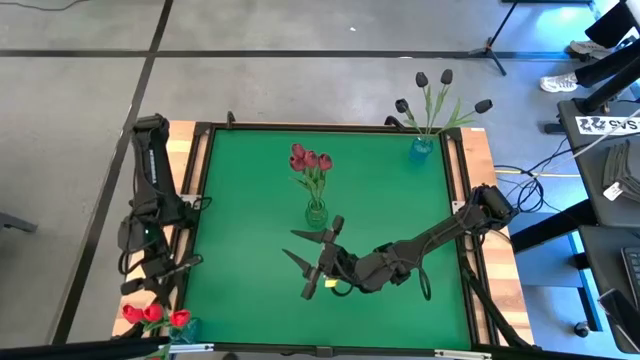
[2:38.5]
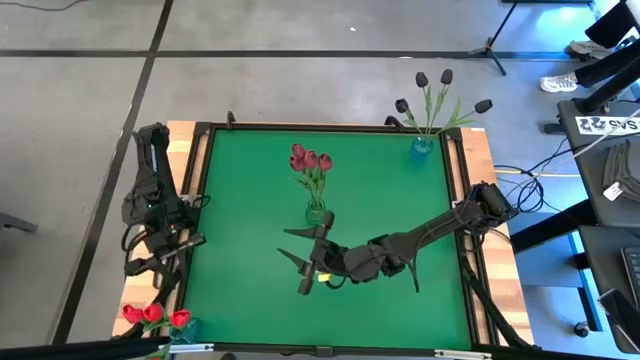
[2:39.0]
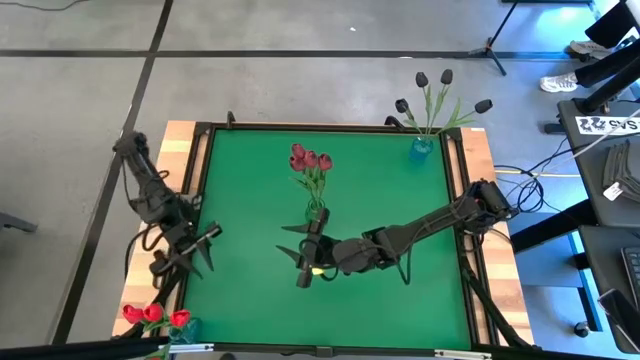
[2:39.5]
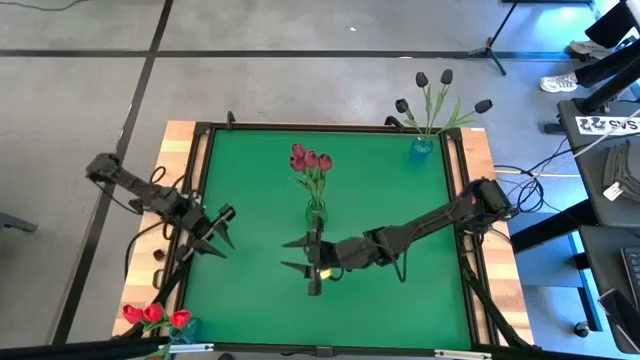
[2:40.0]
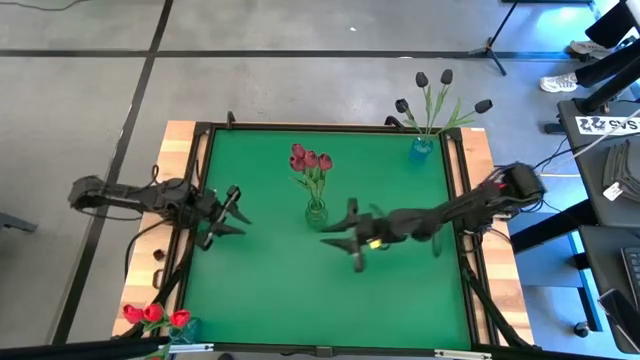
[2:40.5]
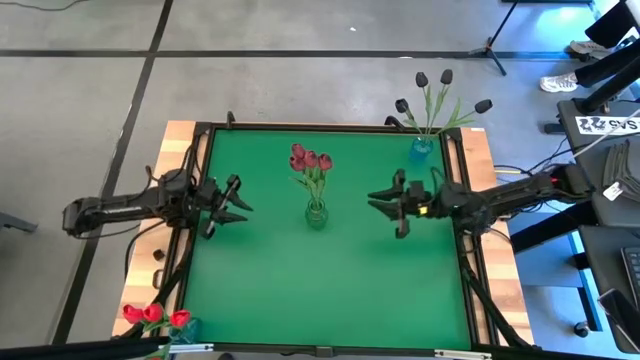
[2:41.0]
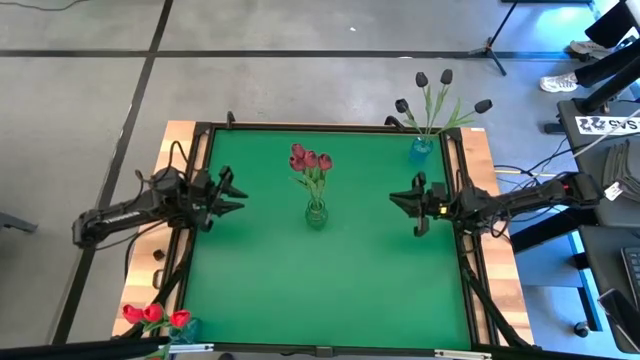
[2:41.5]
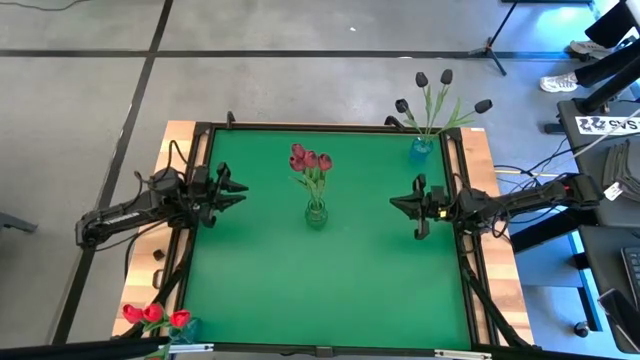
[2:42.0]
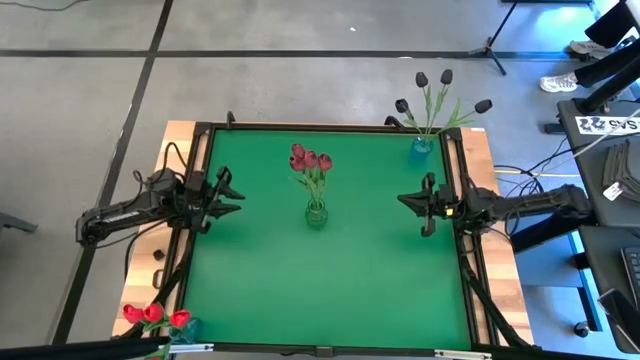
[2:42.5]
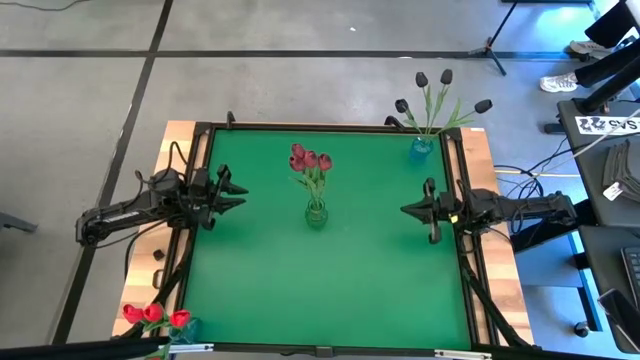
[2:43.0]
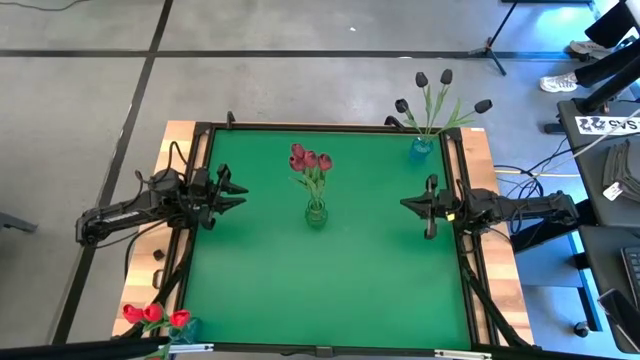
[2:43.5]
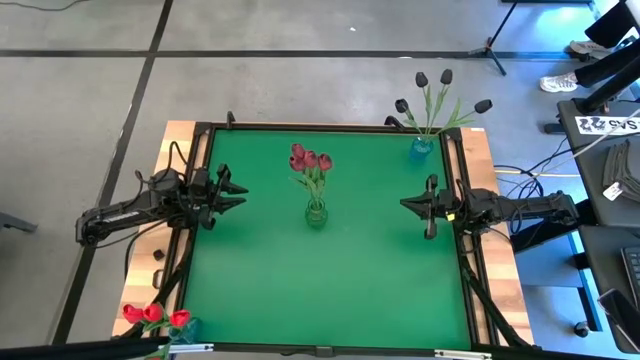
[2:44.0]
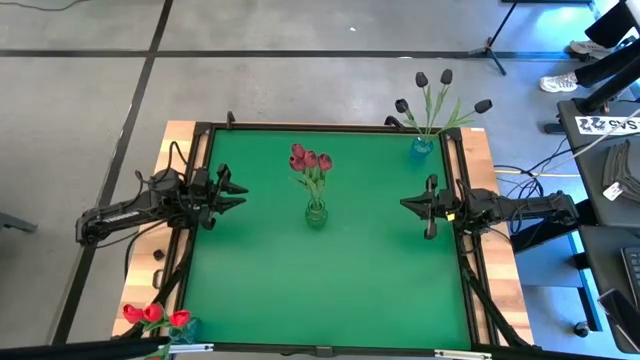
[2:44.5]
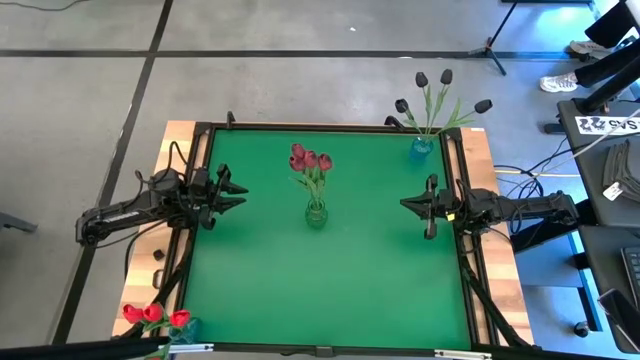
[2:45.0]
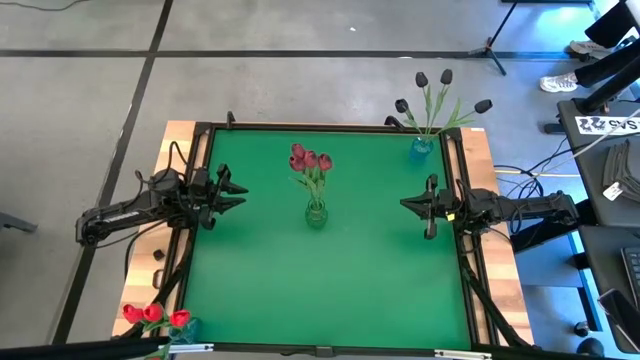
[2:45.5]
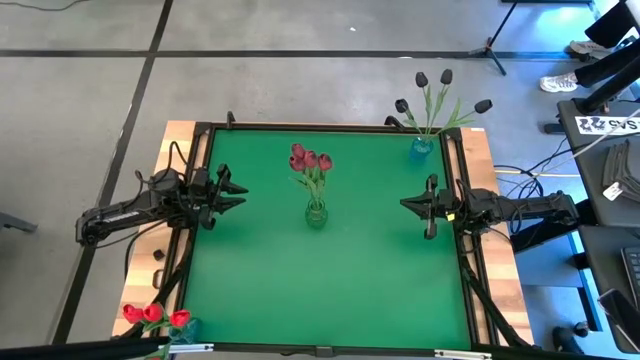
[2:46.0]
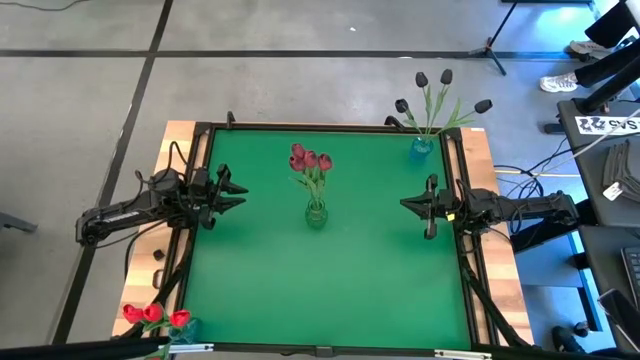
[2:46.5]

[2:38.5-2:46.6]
Task: Sort flowers into vase by color
Return to Home Position

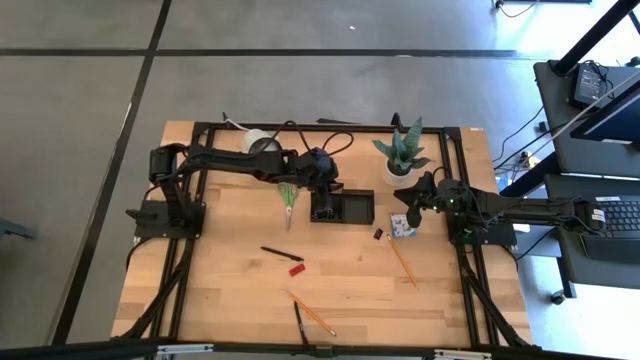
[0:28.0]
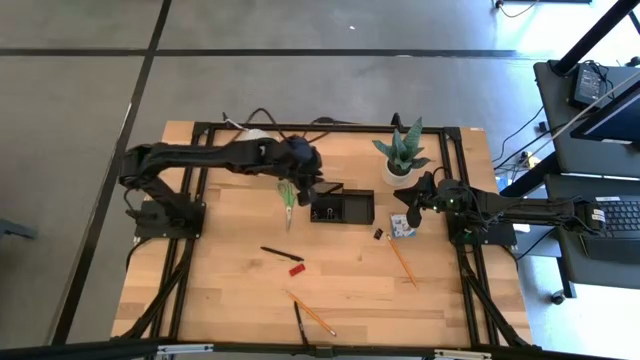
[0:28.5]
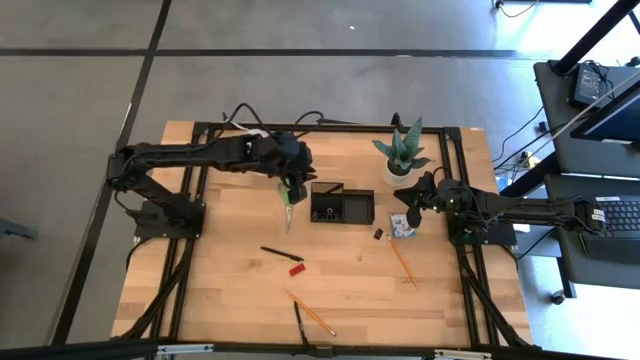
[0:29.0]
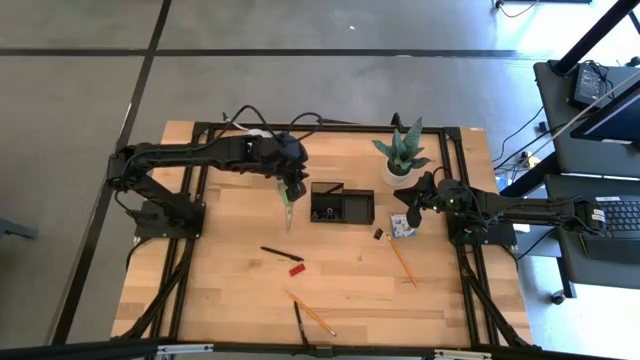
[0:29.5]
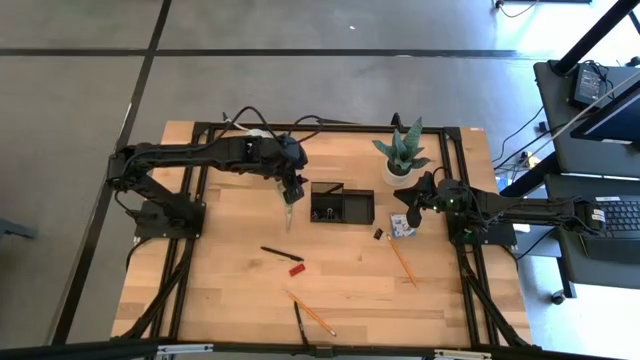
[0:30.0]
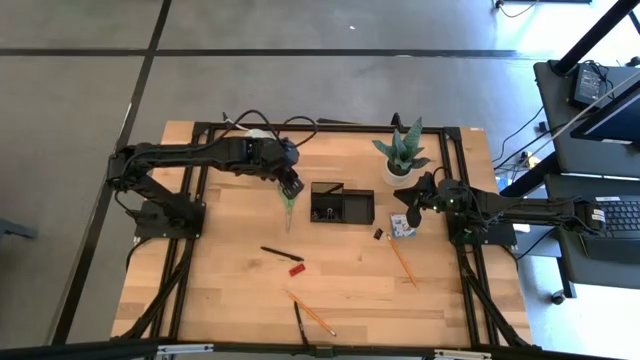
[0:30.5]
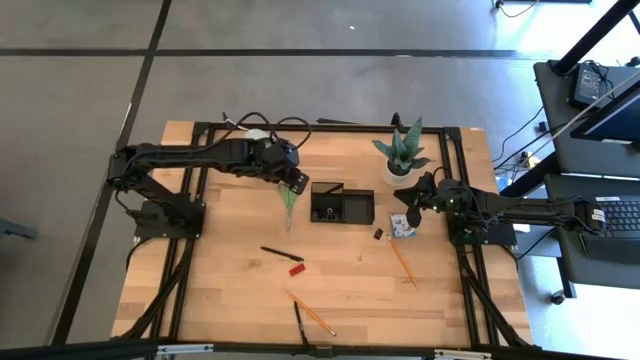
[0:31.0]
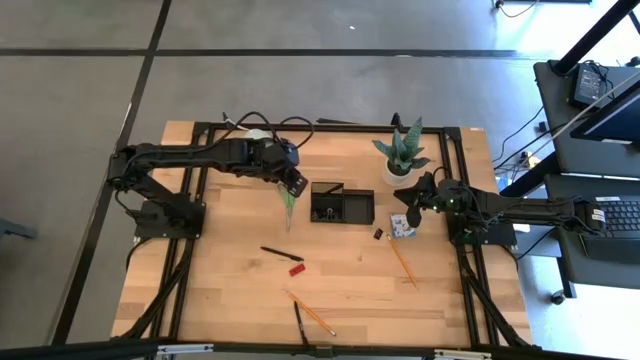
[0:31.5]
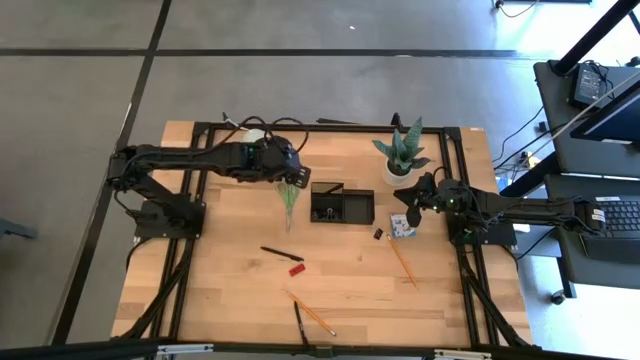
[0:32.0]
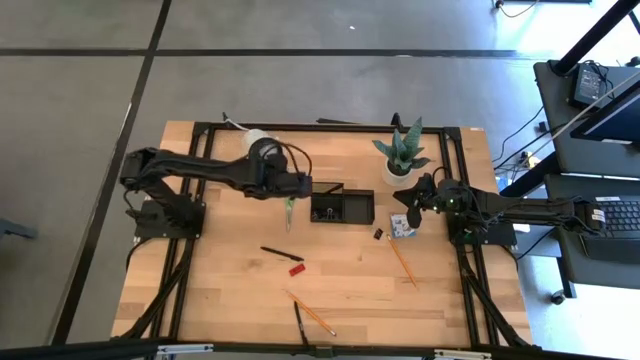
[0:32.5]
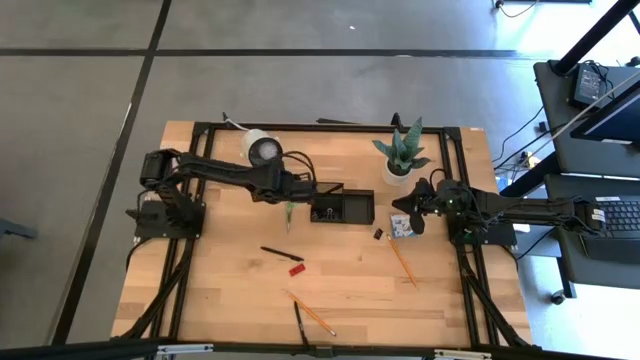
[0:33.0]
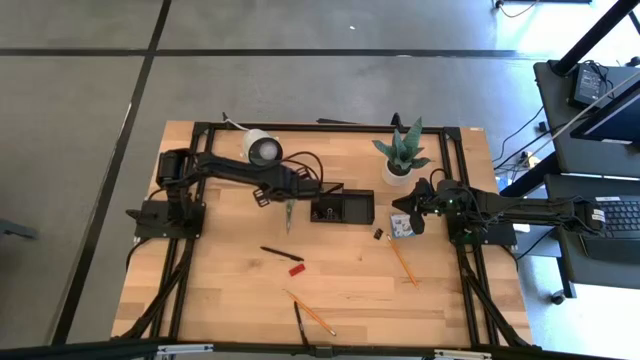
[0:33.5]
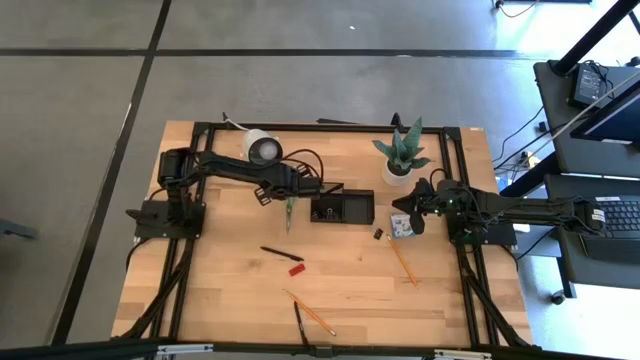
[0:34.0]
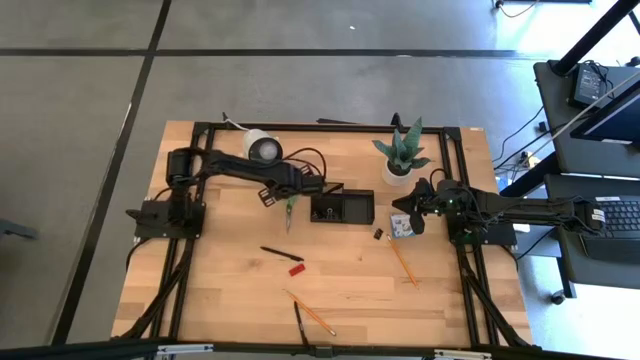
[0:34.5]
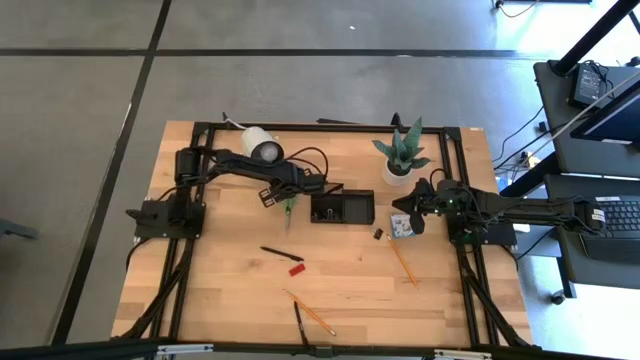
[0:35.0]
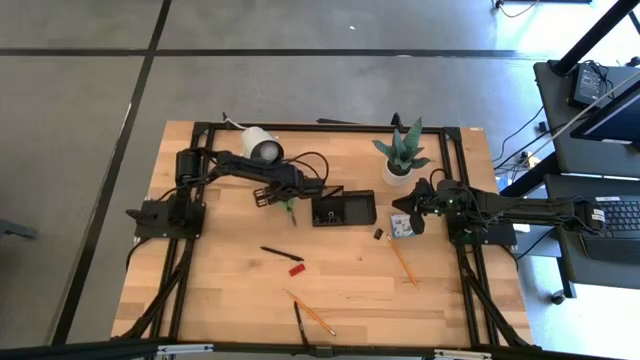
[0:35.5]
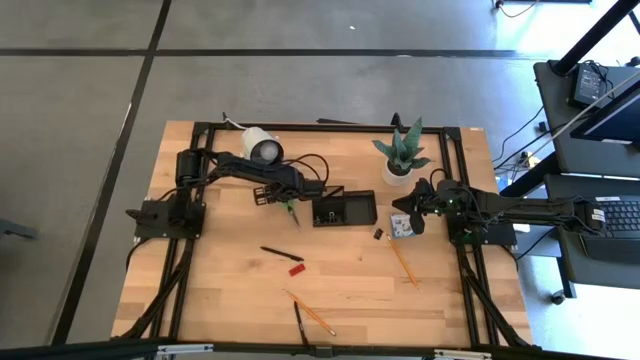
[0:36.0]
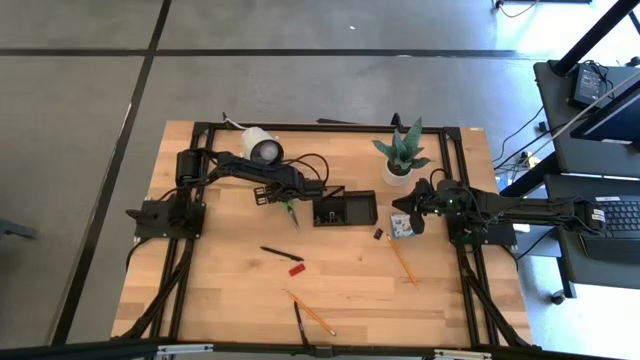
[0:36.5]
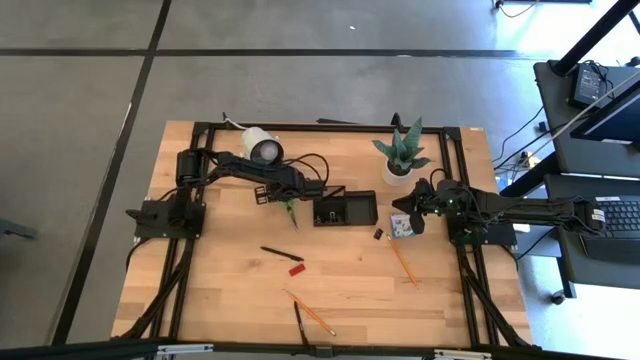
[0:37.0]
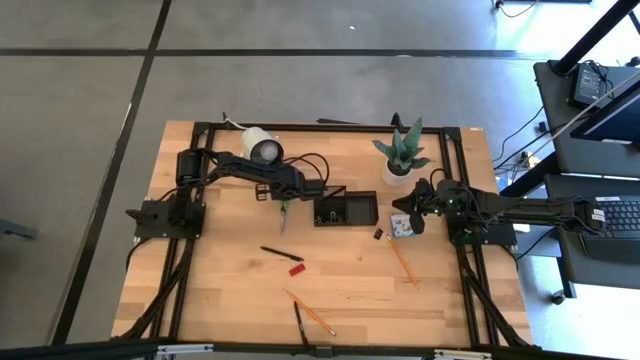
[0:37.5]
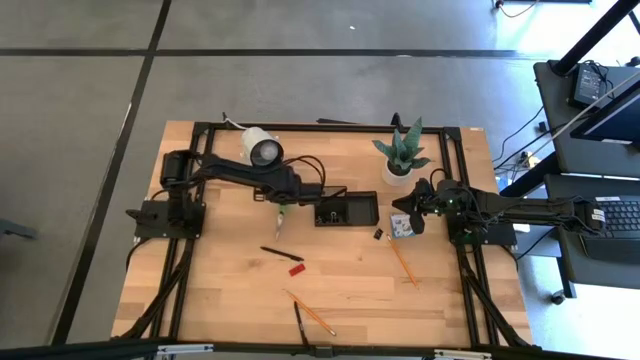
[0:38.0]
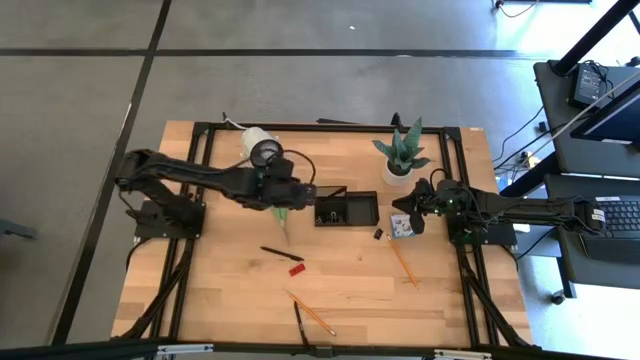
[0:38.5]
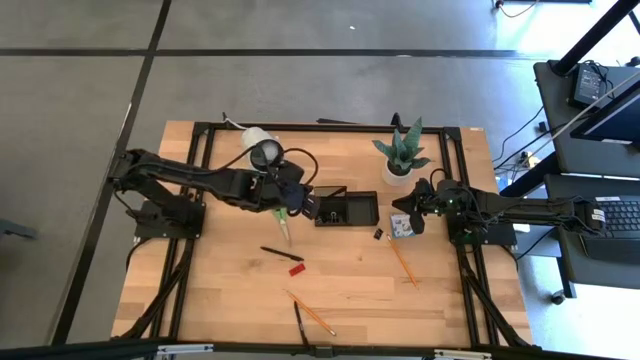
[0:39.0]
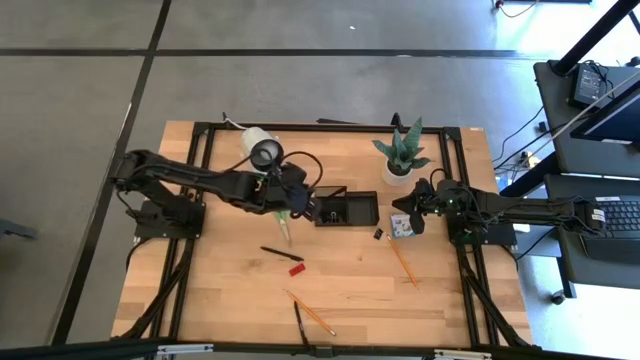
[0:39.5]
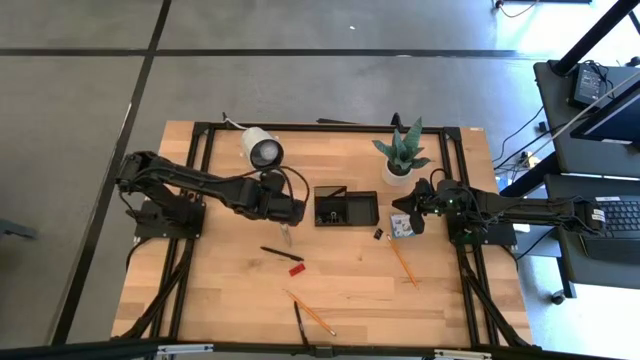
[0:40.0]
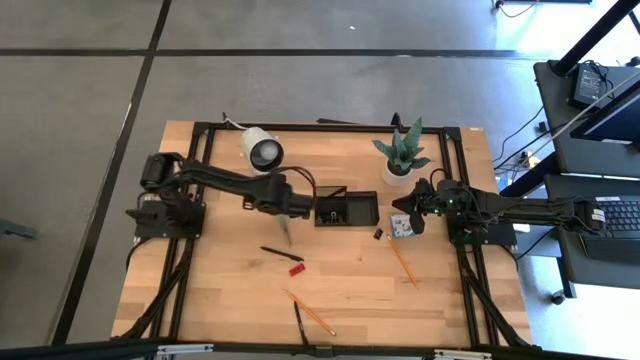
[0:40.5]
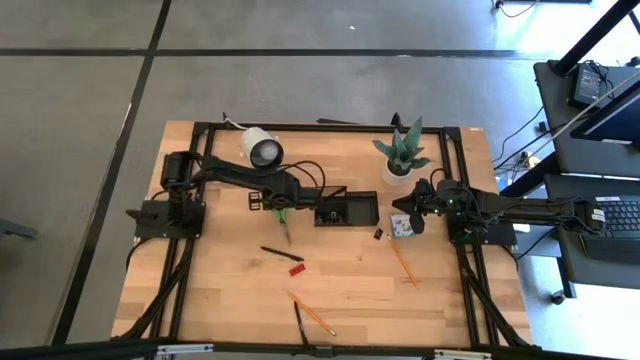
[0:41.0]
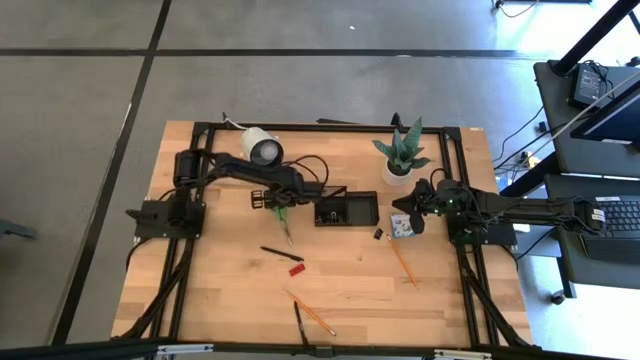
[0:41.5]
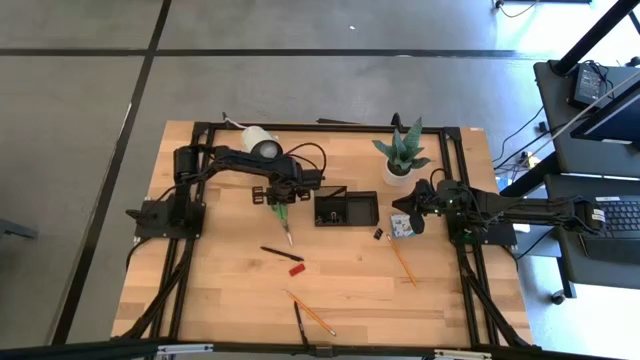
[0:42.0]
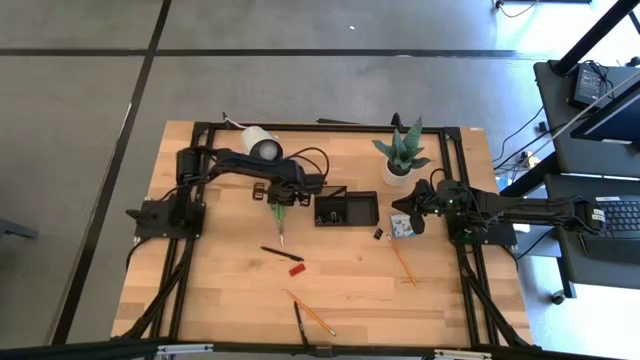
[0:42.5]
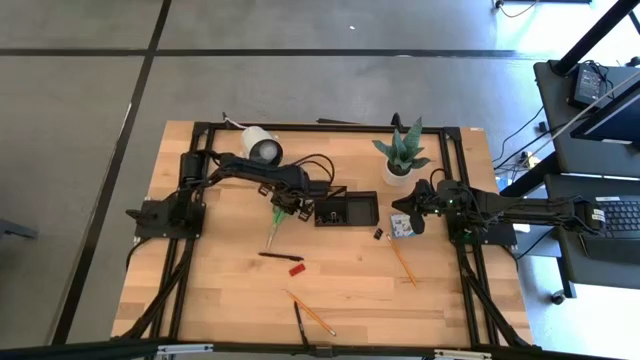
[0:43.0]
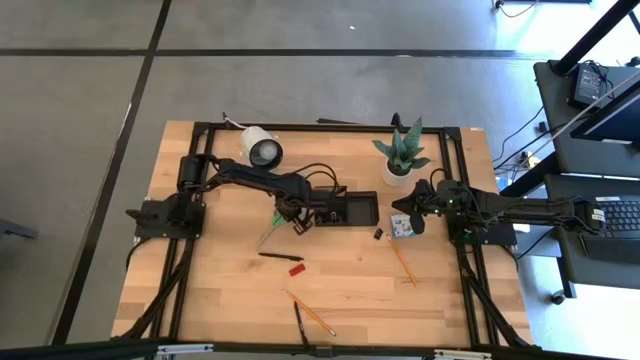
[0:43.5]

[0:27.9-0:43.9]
Task: Pick and place office supplies into organizer
Put the green scissors in the desk organizer
